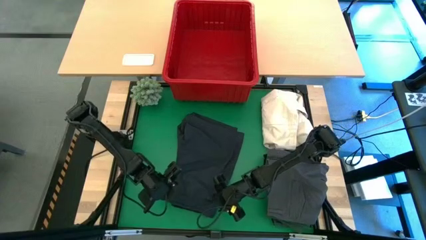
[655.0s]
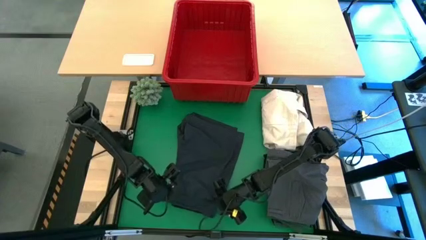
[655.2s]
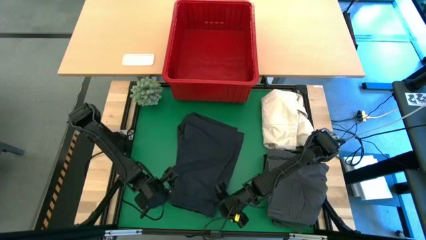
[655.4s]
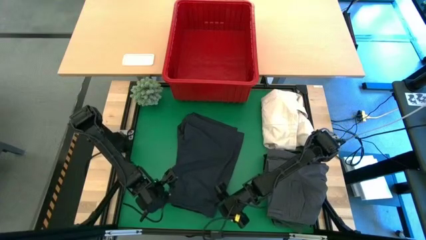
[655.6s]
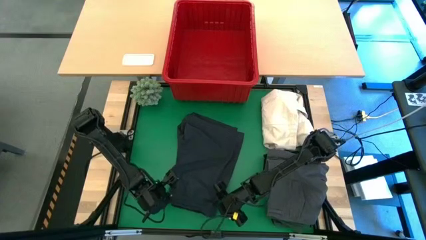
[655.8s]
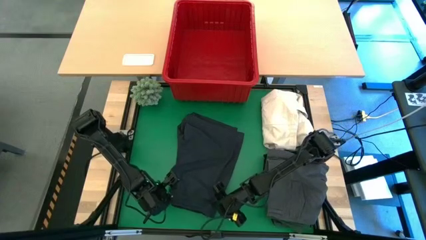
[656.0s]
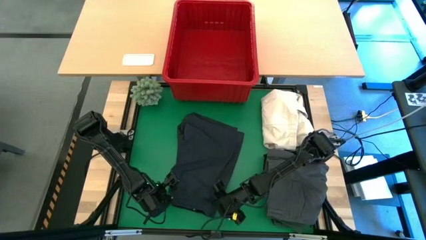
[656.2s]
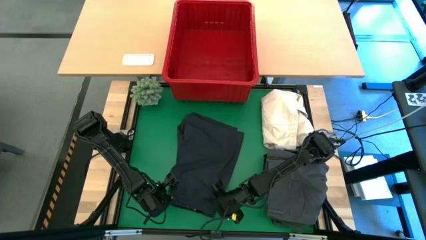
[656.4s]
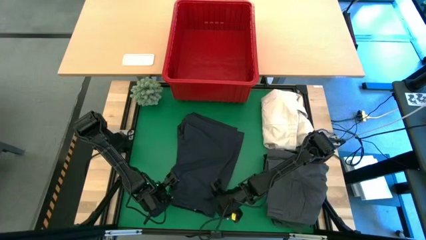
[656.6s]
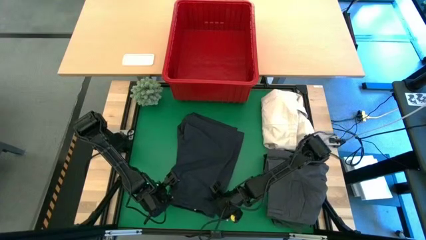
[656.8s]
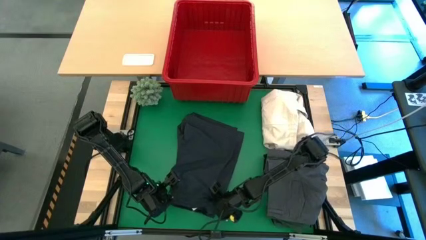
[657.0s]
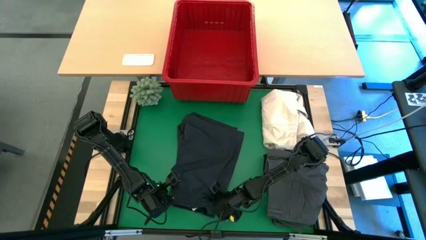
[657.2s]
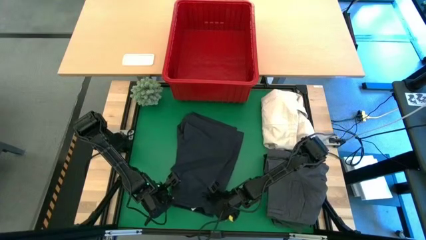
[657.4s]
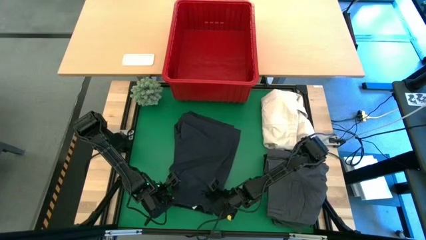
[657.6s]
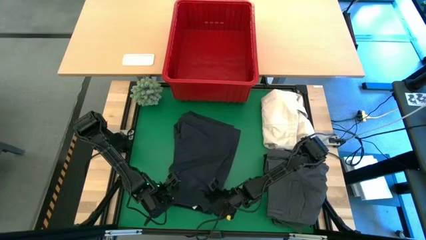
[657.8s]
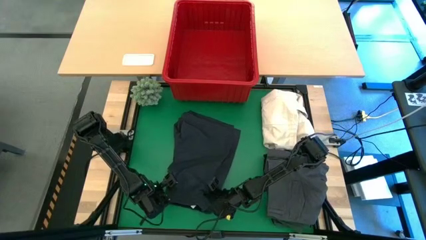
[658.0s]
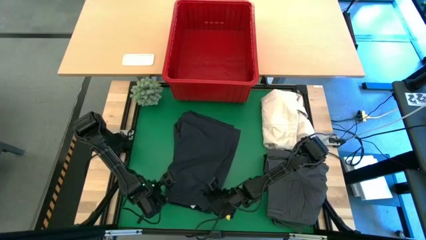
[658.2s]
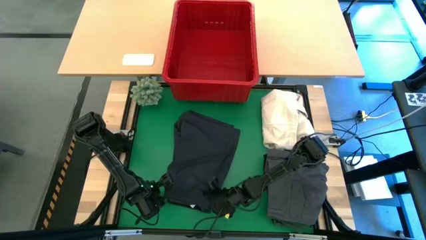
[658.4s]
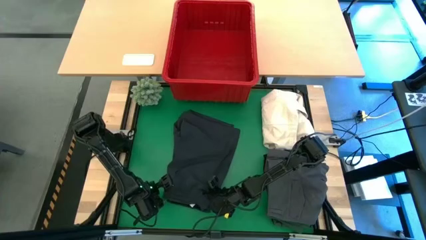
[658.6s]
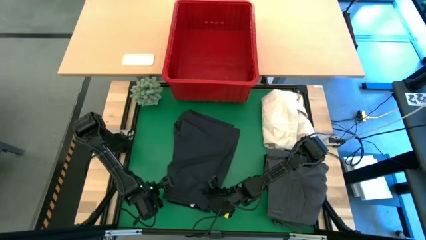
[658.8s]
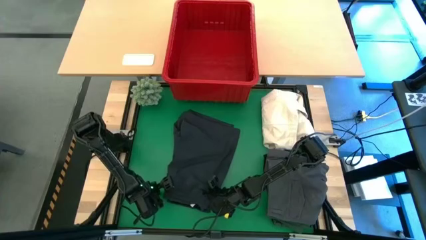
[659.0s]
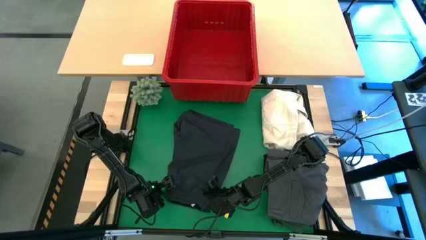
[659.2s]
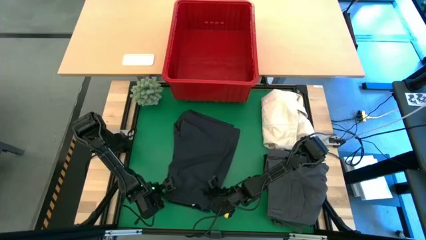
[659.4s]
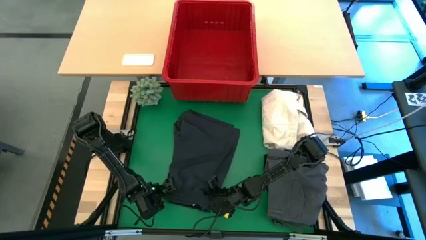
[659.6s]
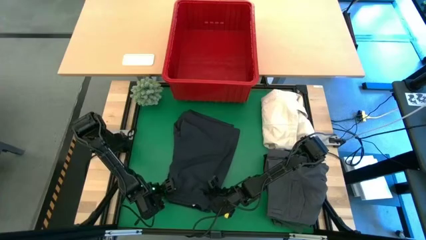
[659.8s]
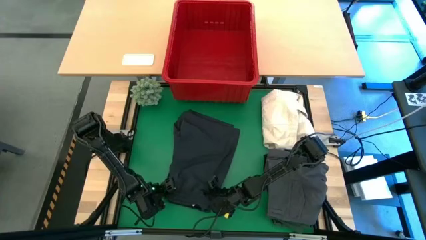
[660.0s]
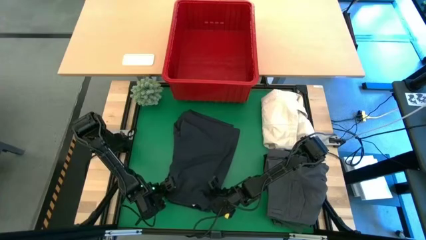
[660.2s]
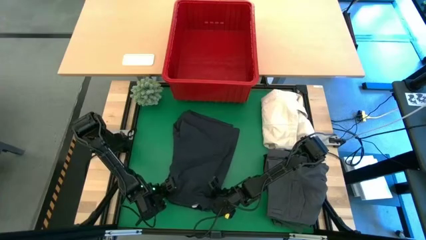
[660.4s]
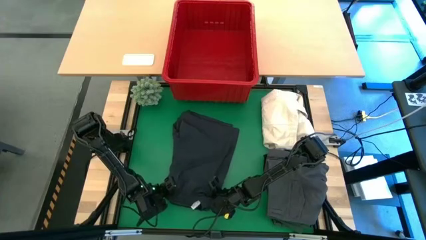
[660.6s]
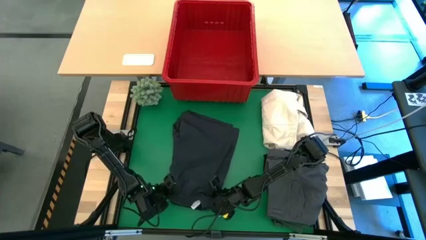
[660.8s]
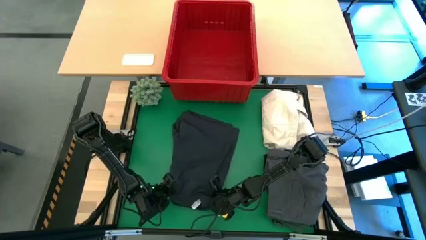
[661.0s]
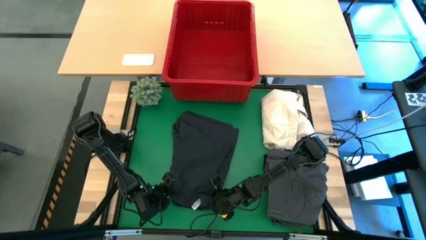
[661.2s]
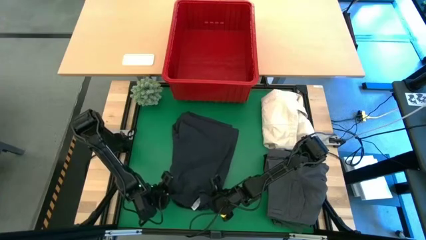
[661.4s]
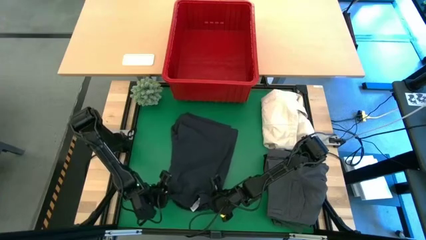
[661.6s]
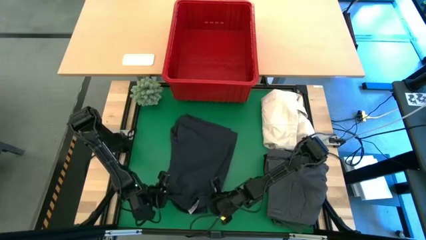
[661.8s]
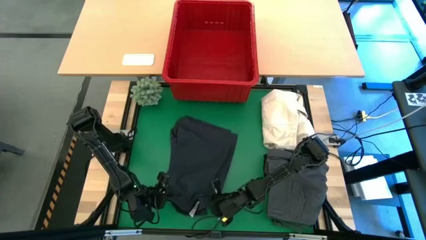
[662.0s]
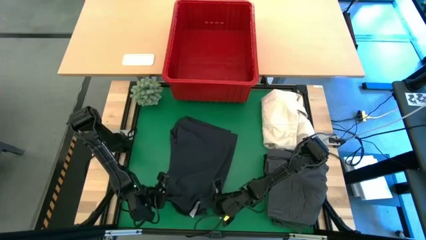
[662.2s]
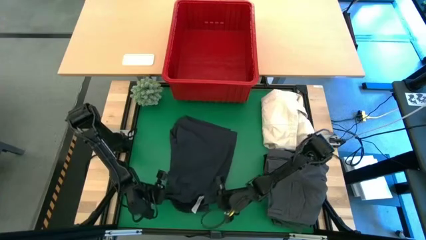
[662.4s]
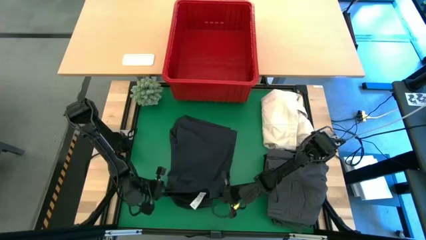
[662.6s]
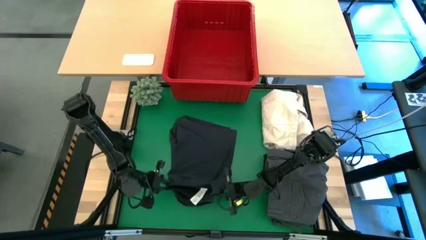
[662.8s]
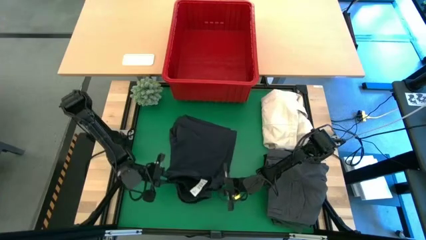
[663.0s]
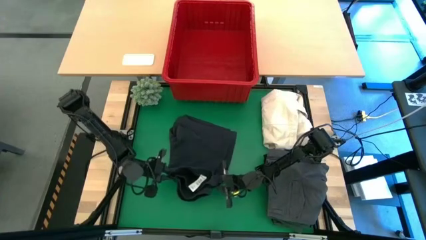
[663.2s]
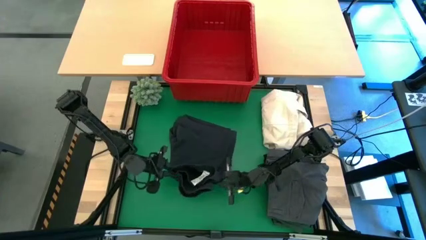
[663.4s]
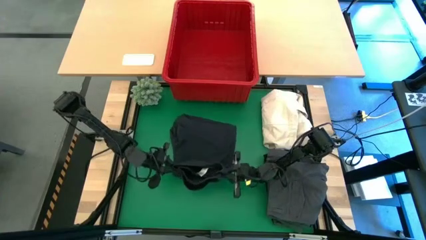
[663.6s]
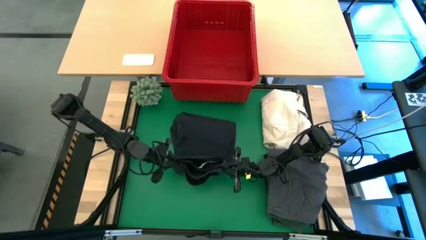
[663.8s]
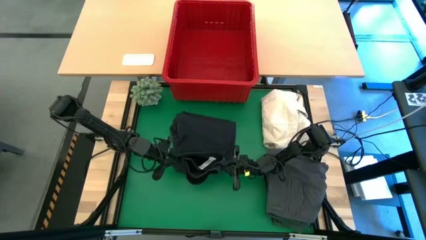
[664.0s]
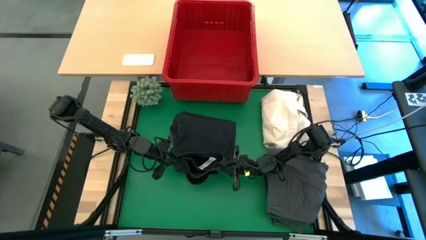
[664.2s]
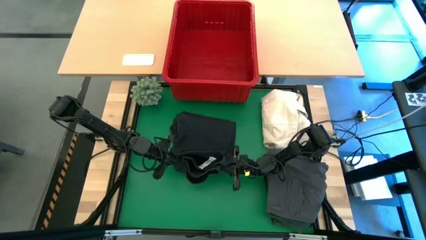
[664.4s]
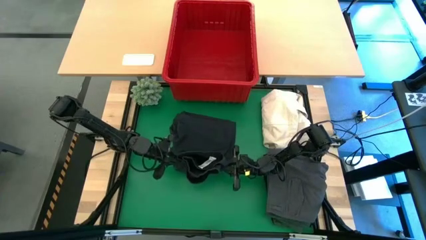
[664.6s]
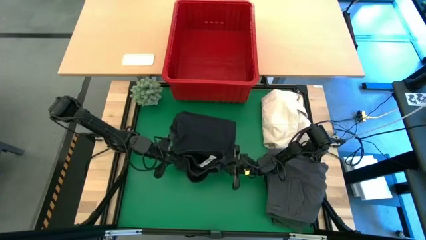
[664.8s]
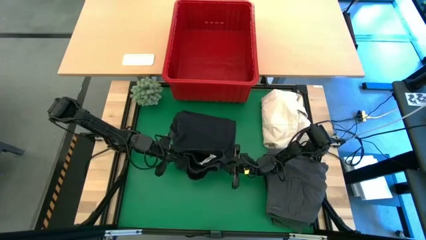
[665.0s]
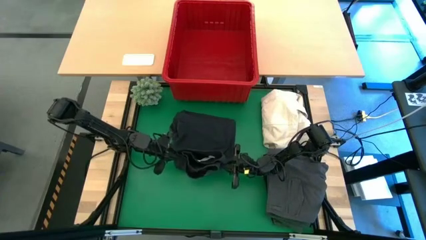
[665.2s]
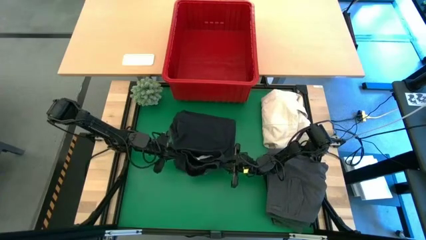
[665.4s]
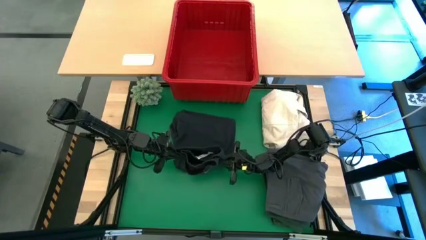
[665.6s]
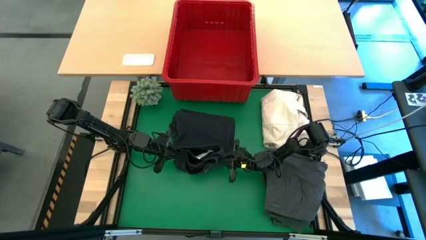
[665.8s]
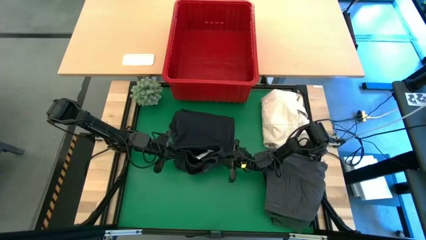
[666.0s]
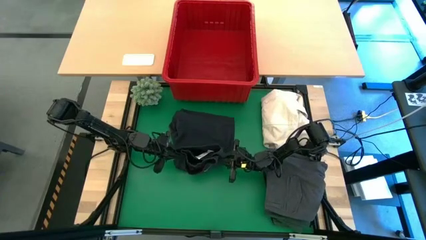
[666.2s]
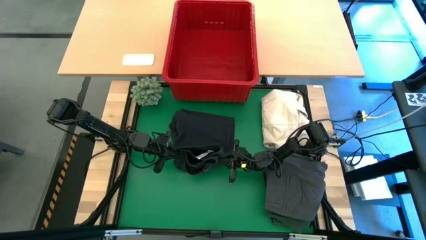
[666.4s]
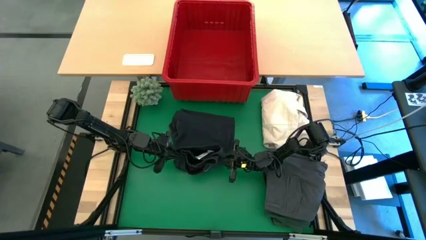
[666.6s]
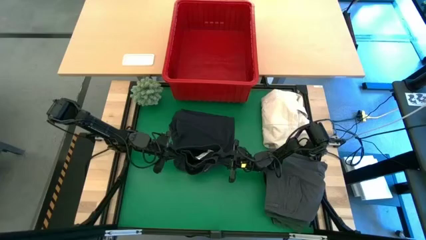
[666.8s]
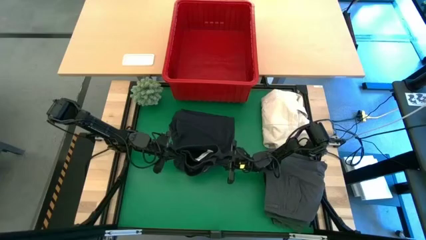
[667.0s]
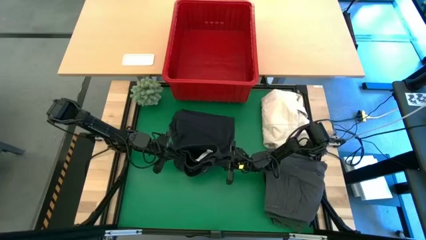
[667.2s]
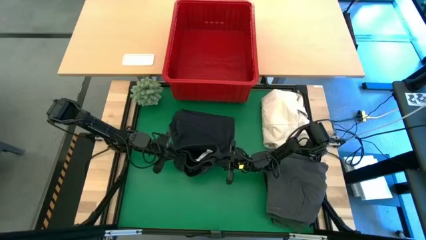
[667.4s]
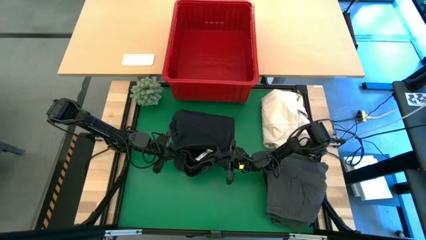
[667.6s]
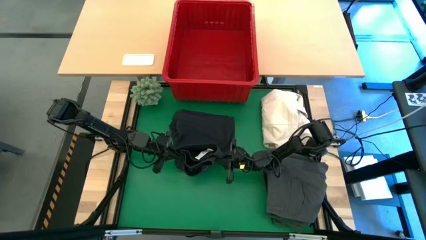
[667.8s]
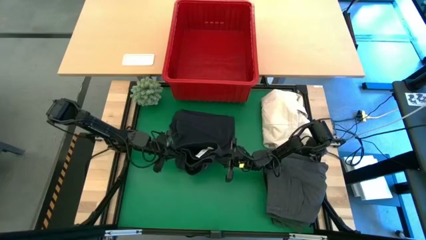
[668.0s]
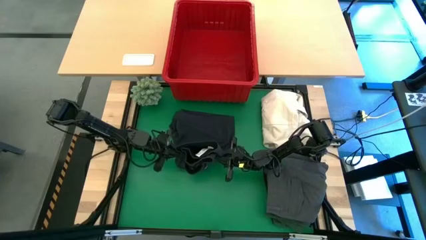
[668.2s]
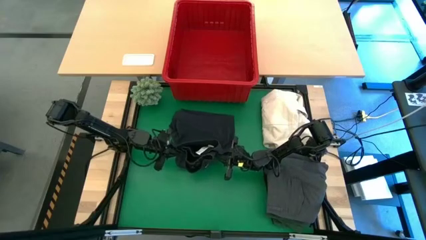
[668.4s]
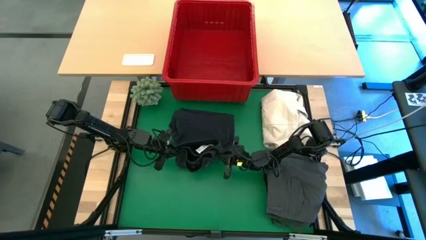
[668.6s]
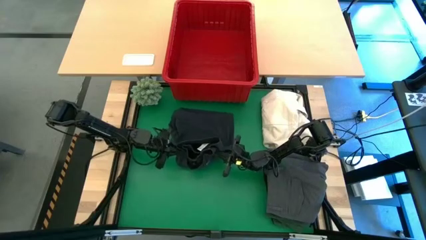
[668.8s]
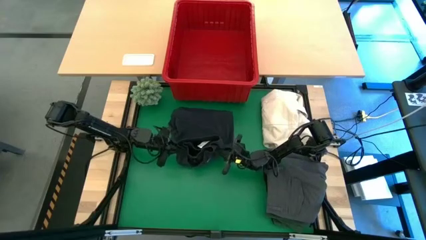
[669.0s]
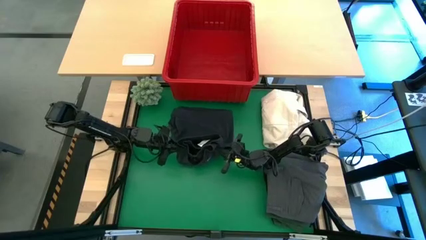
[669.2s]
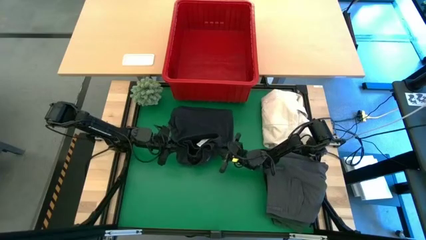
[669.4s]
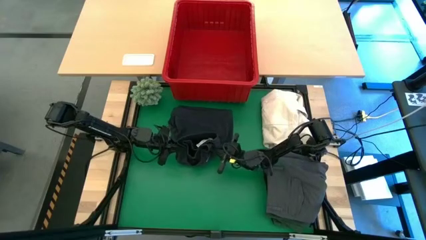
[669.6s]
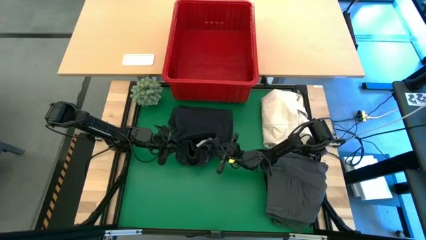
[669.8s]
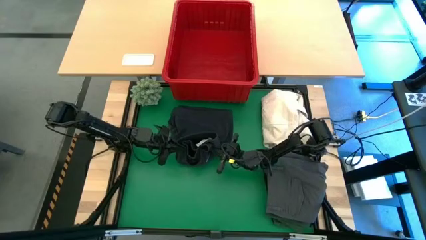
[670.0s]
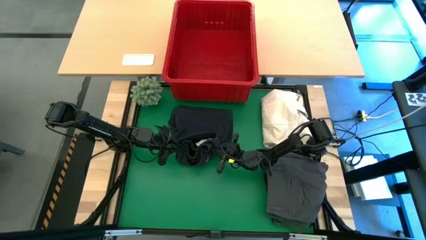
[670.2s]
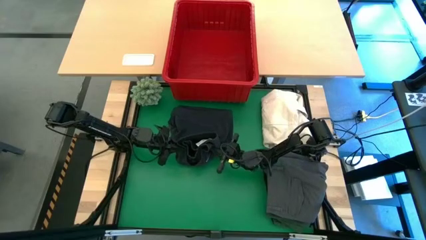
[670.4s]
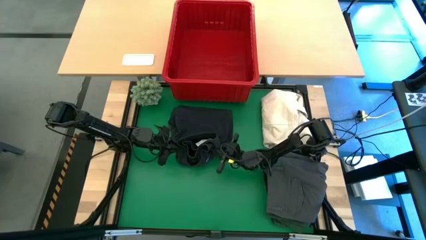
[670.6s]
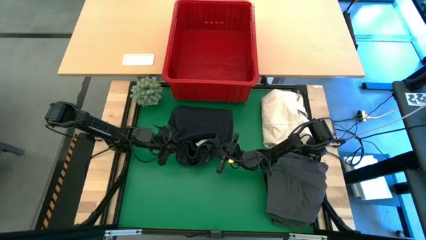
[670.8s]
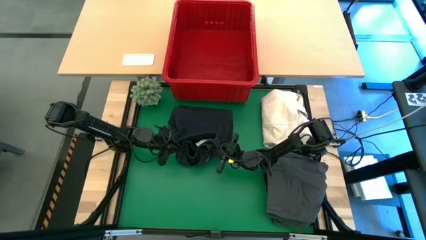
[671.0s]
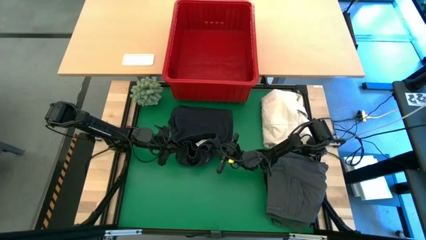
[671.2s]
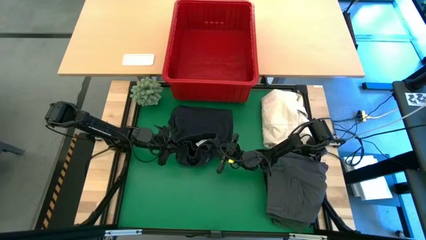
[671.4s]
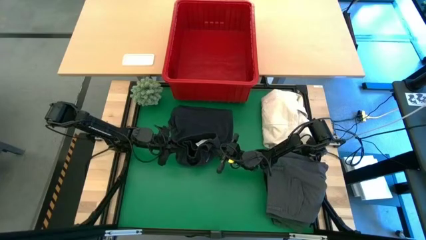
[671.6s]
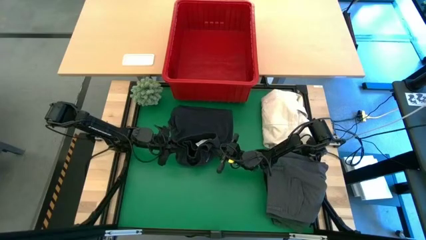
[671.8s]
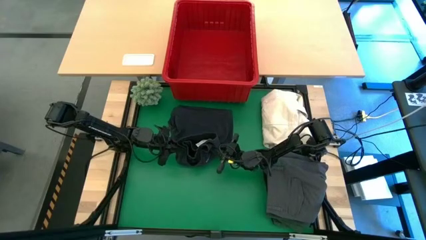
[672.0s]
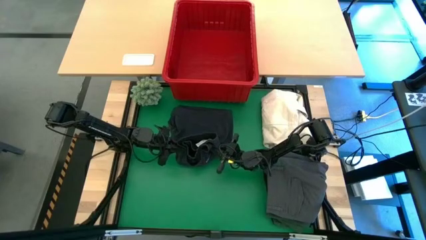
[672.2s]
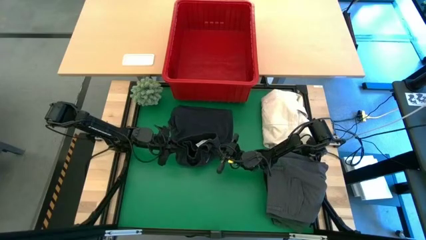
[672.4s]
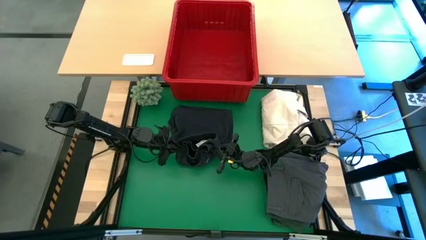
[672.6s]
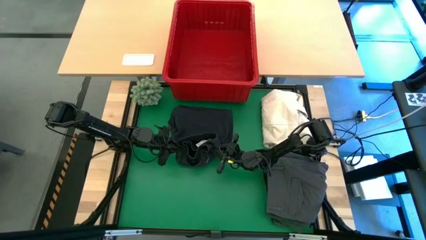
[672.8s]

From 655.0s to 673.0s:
Task: Fold laundry
Fold the gray short
